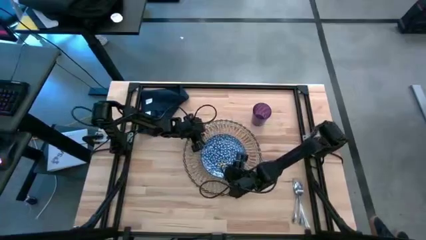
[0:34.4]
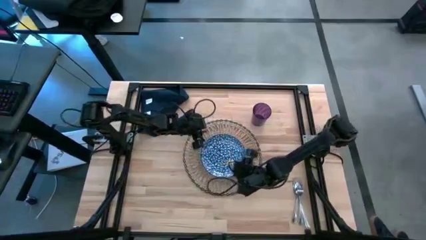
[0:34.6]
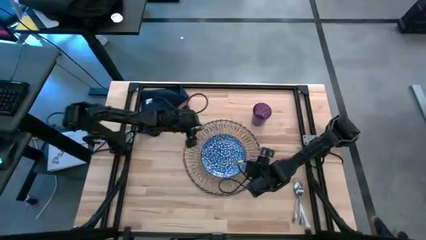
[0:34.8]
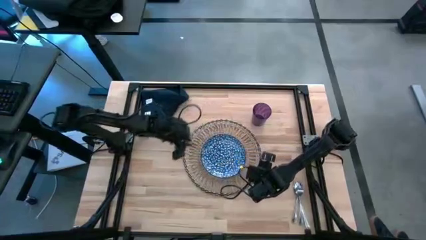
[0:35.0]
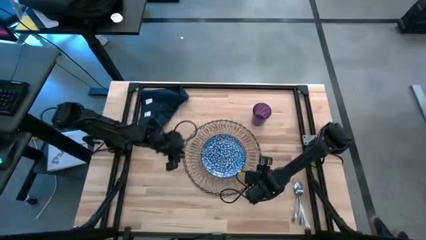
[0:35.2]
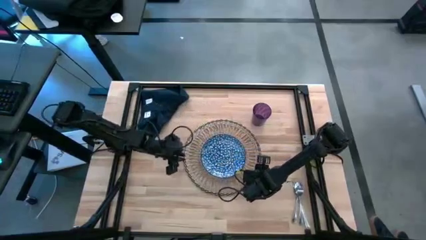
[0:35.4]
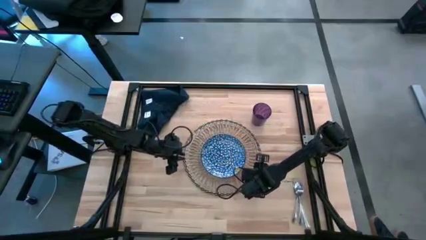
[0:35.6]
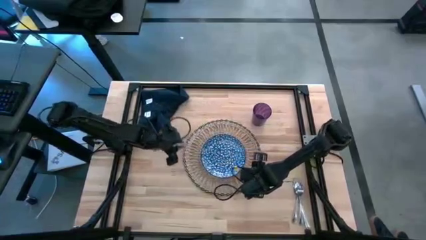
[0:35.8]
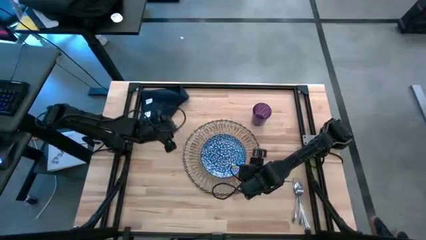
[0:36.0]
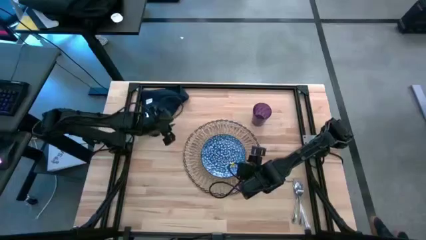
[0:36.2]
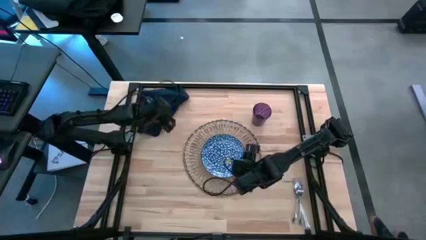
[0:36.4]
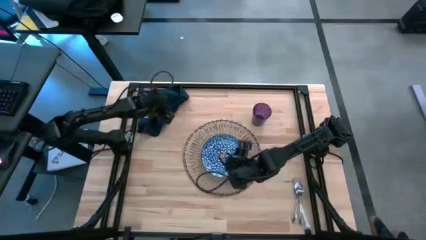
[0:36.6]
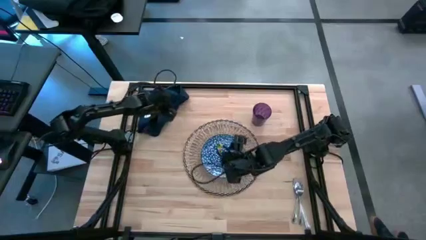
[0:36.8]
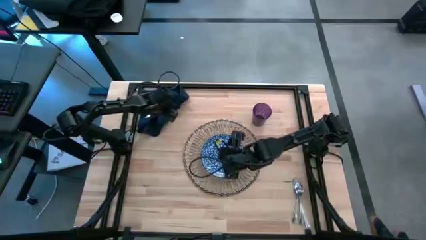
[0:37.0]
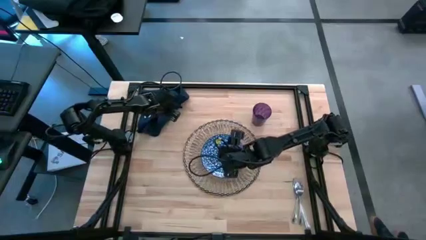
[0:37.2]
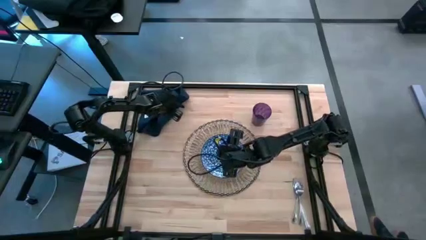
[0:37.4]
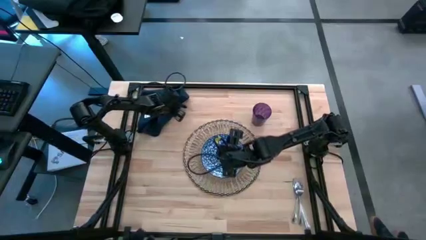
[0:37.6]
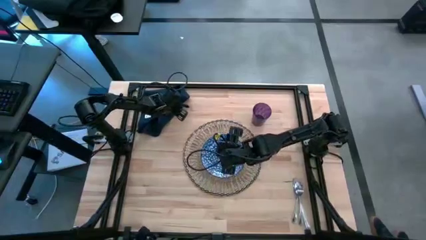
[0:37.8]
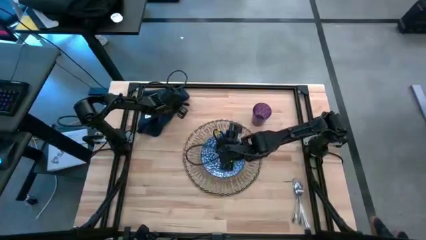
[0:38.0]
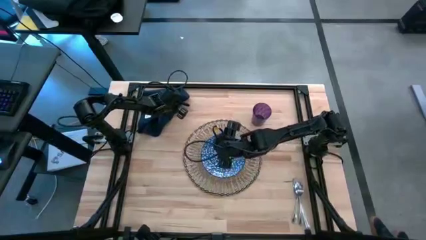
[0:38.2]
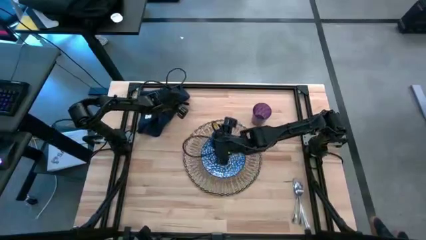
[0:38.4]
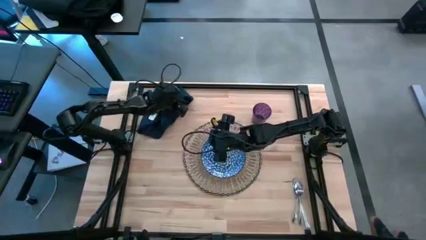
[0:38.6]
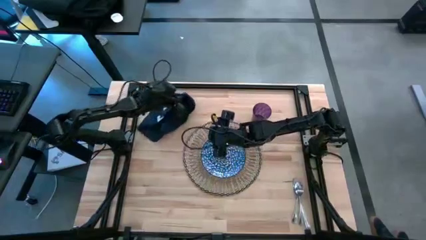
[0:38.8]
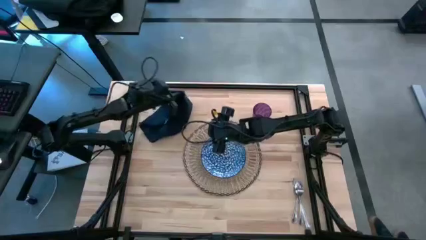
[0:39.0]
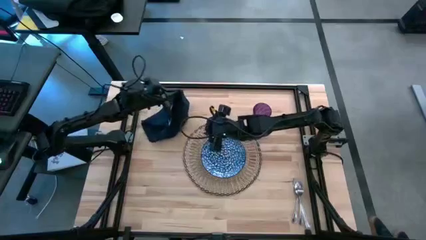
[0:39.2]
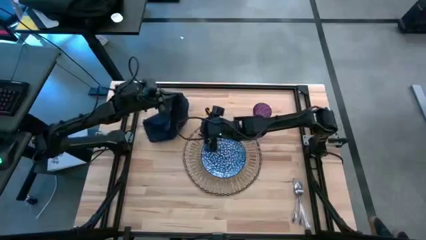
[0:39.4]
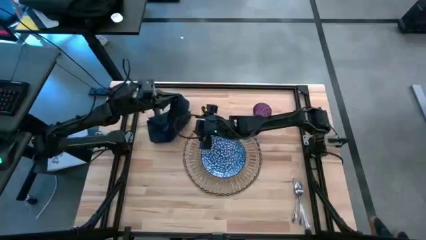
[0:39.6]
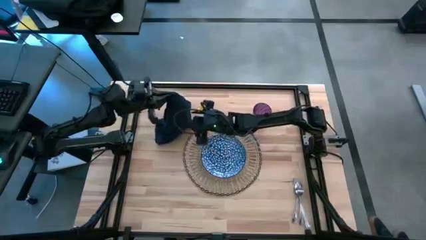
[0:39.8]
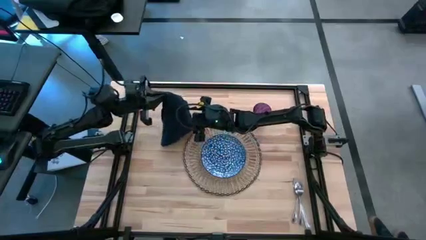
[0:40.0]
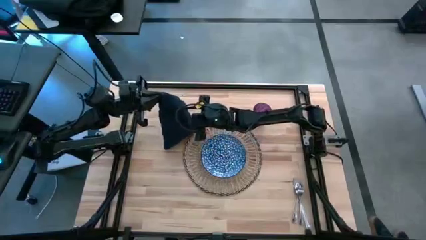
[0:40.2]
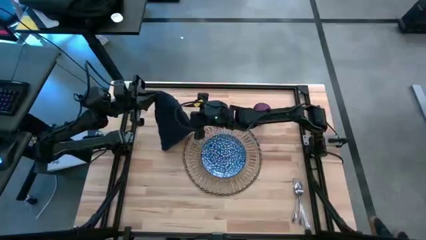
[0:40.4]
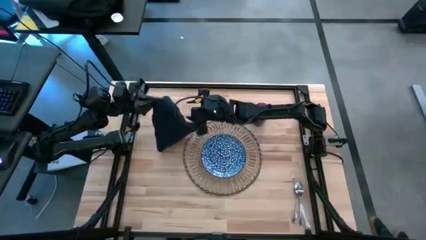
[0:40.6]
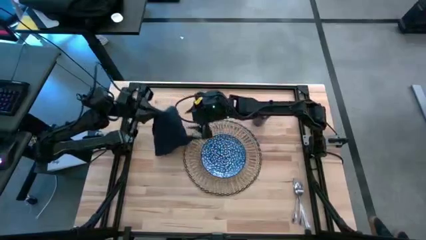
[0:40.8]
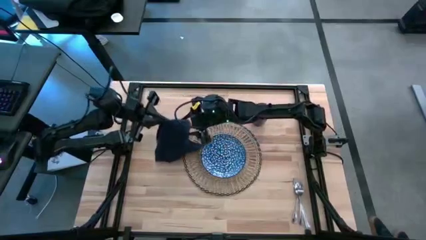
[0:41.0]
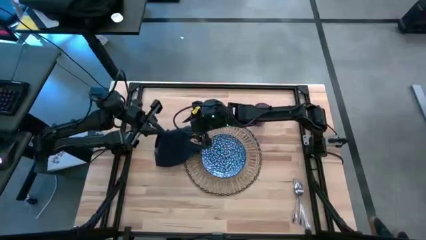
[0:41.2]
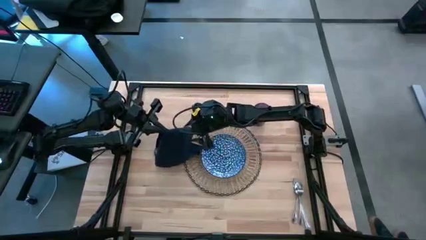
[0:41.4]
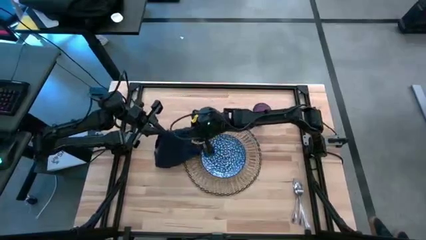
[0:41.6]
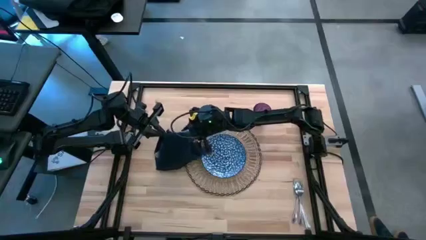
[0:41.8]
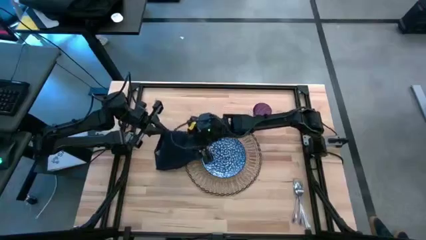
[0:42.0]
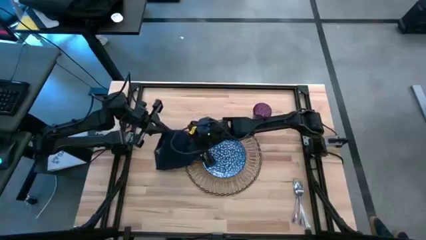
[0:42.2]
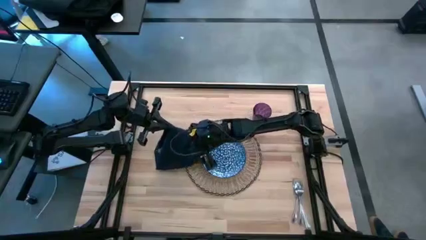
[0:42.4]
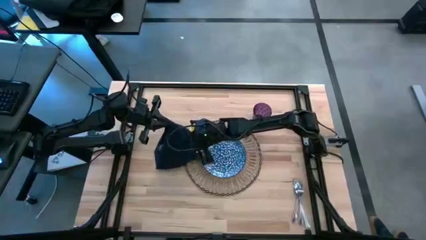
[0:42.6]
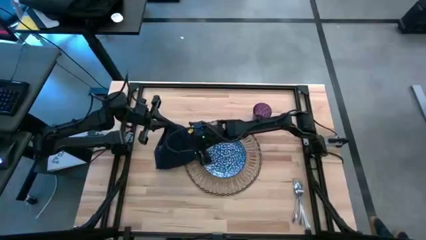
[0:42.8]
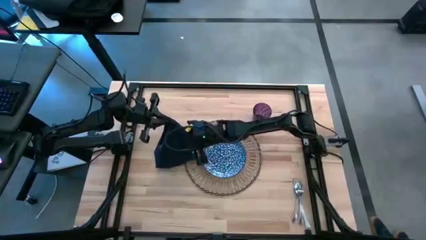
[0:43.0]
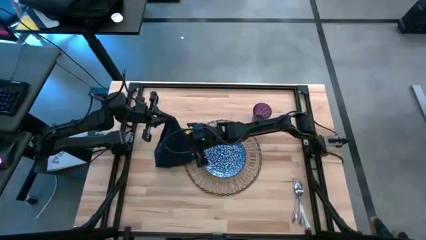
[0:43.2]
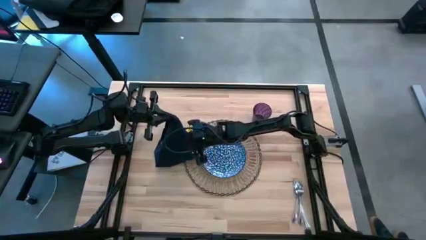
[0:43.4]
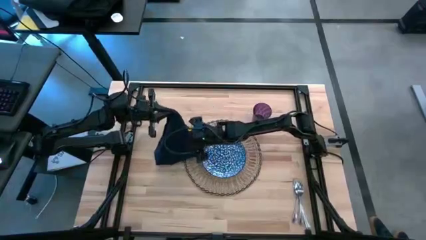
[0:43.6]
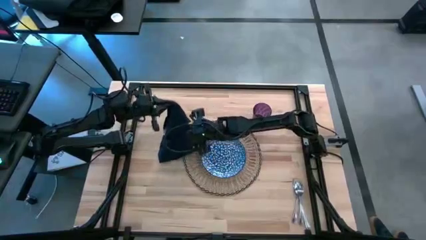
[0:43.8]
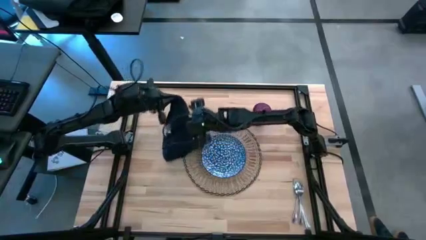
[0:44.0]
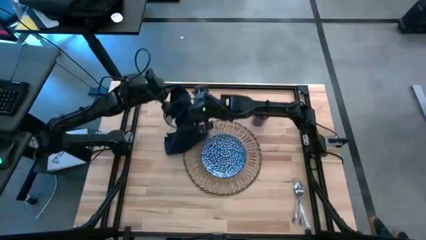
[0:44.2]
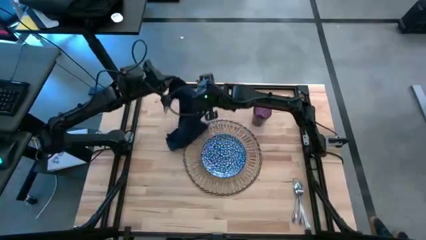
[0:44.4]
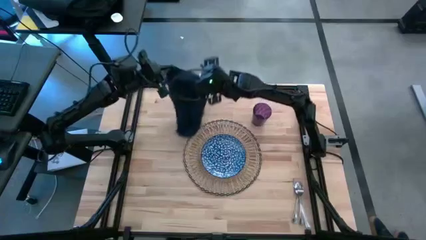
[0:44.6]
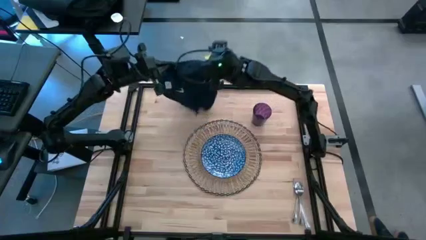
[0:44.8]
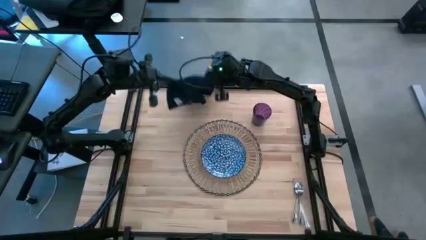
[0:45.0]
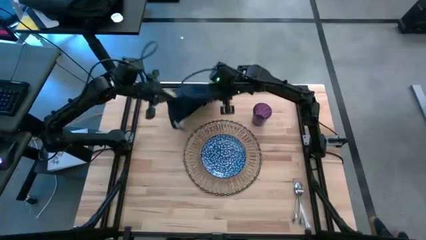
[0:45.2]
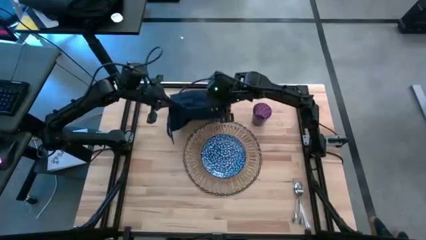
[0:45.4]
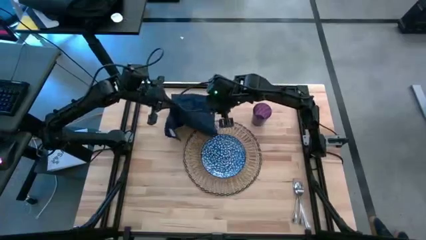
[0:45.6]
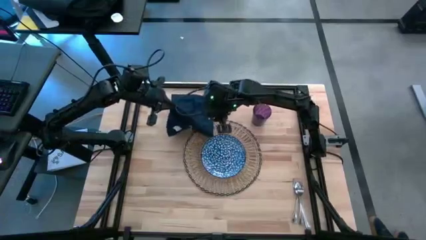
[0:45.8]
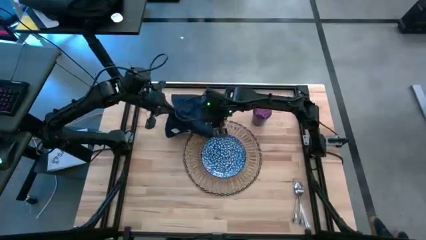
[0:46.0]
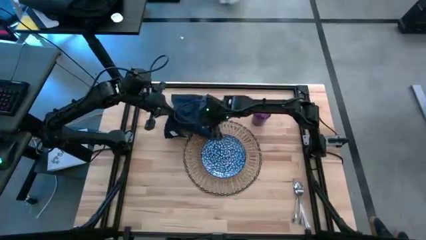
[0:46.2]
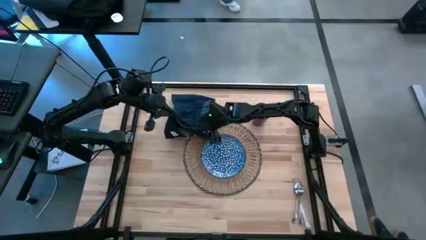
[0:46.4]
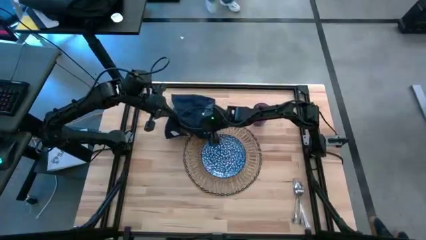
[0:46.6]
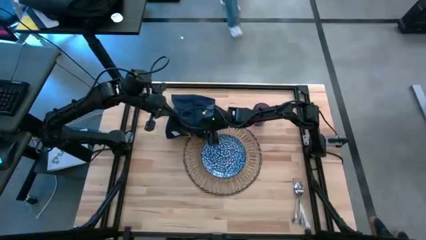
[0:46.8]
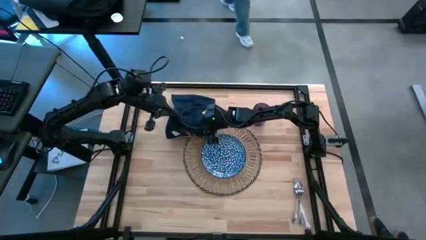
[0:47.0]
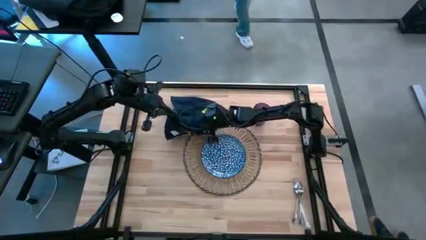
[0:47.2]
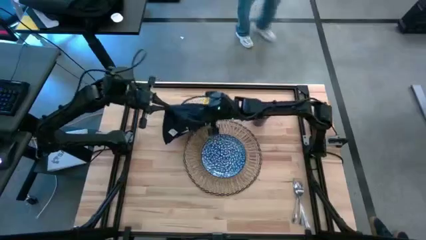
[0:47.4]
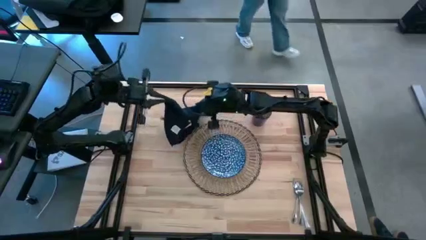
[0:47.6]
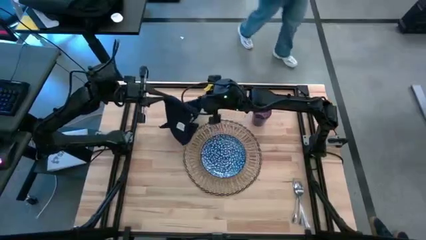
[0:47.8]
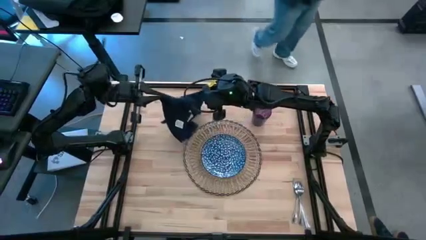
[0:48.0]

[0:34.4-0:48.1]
Task: Set table place
Fold the blue table napkin
